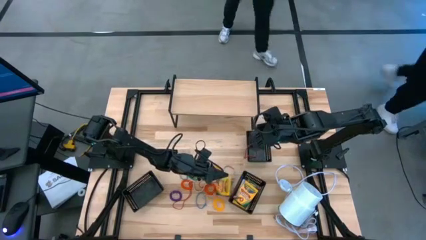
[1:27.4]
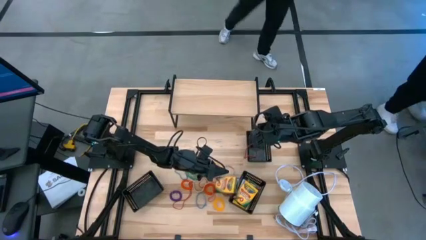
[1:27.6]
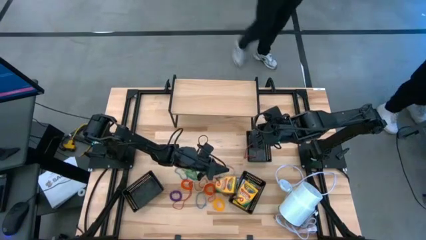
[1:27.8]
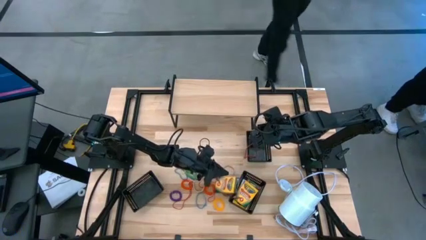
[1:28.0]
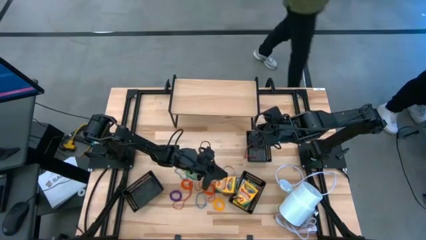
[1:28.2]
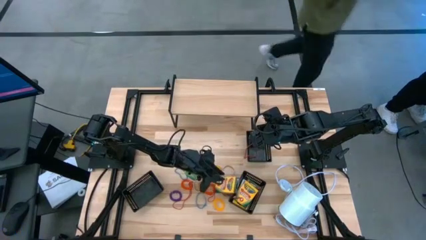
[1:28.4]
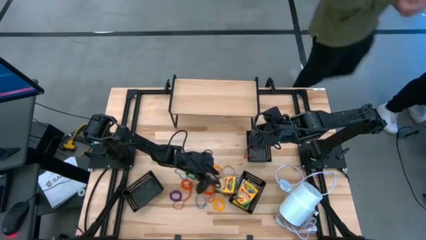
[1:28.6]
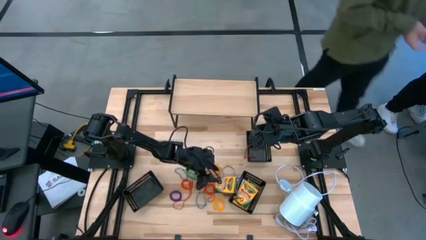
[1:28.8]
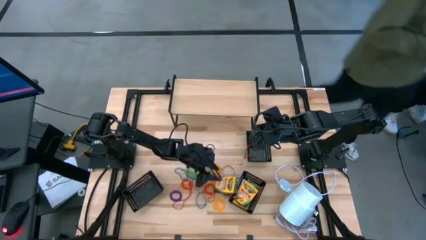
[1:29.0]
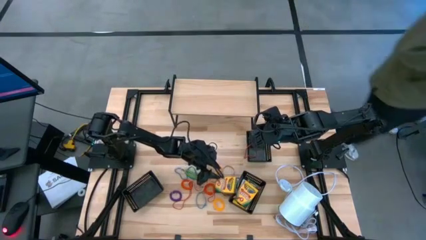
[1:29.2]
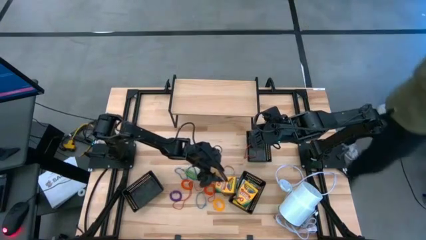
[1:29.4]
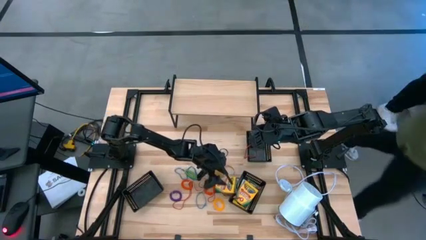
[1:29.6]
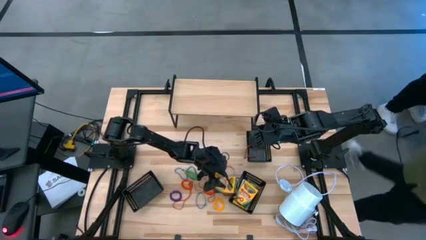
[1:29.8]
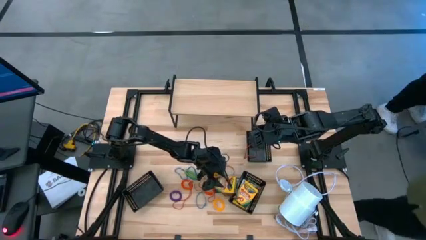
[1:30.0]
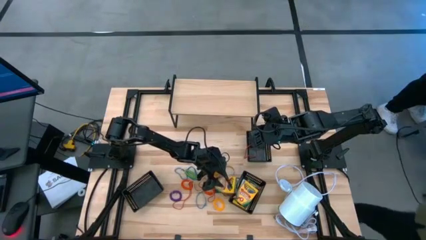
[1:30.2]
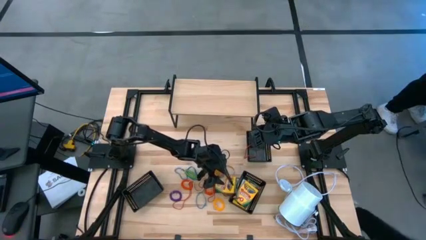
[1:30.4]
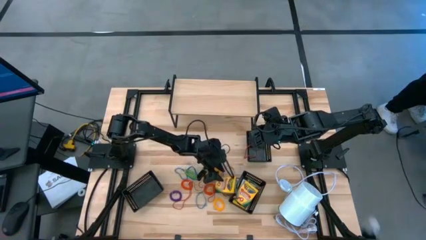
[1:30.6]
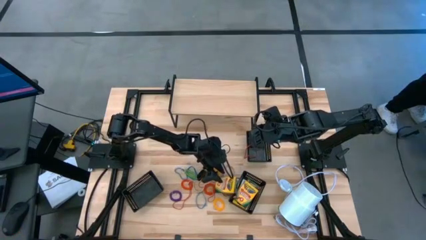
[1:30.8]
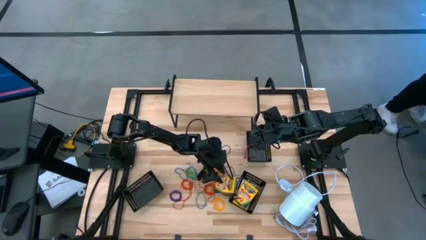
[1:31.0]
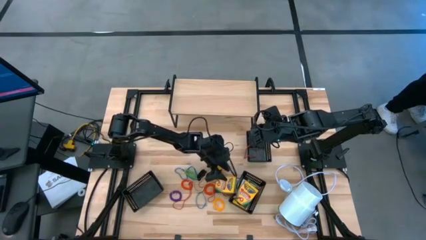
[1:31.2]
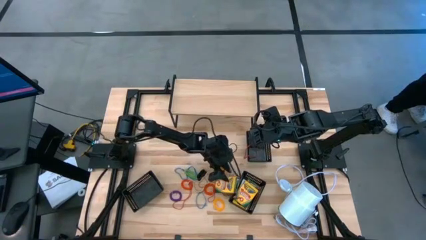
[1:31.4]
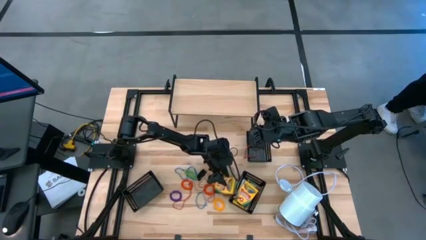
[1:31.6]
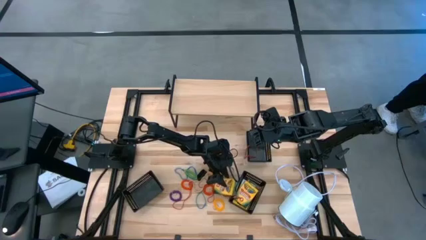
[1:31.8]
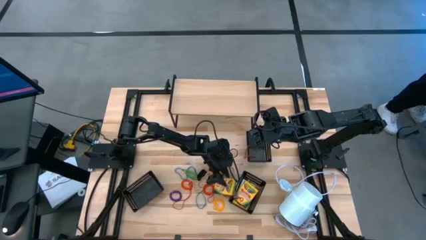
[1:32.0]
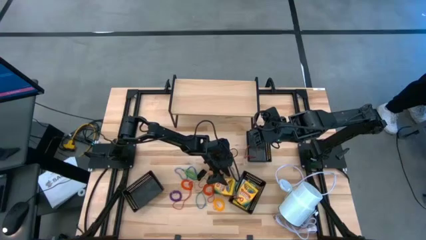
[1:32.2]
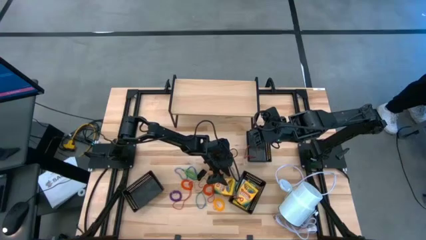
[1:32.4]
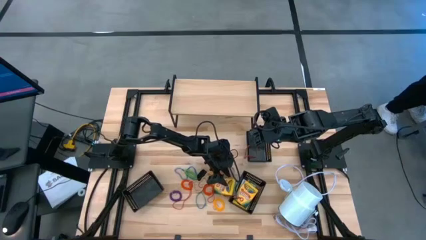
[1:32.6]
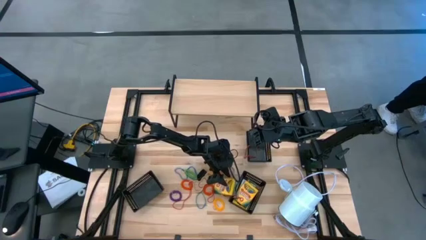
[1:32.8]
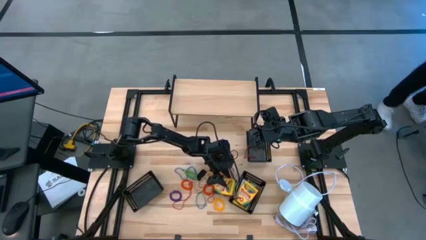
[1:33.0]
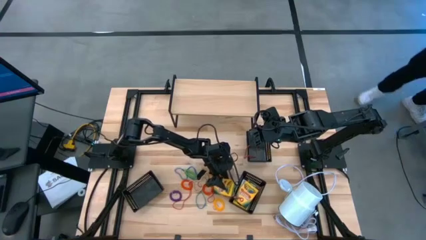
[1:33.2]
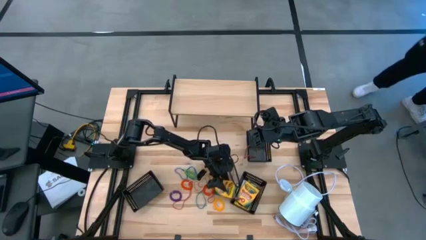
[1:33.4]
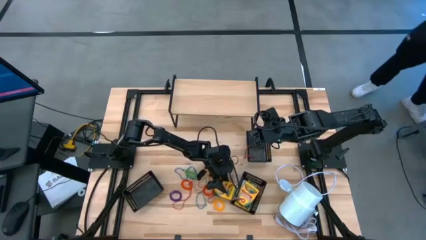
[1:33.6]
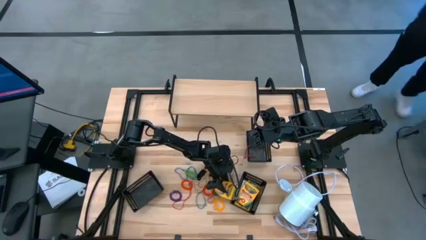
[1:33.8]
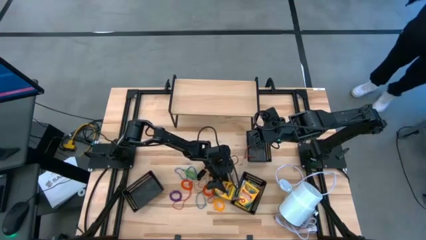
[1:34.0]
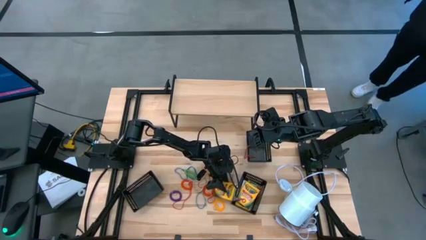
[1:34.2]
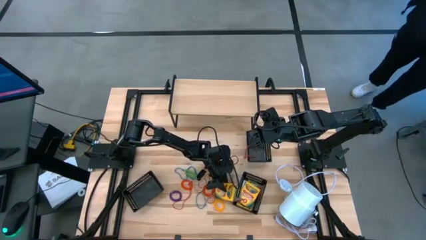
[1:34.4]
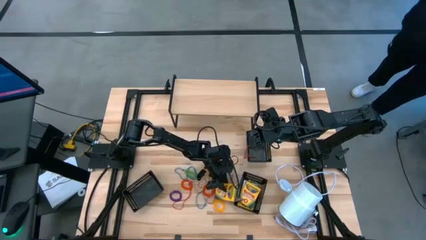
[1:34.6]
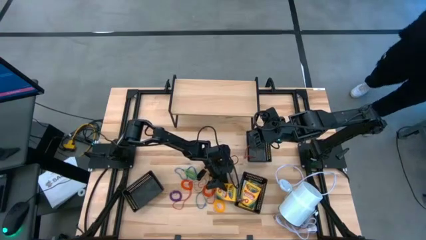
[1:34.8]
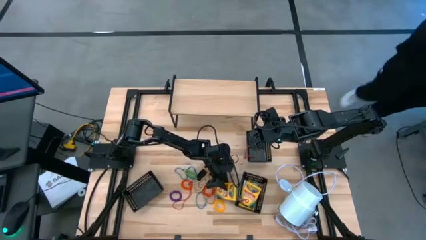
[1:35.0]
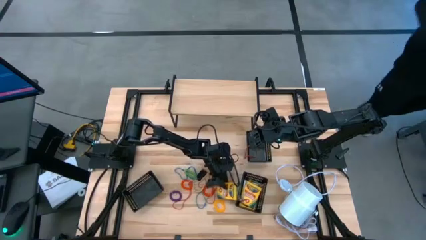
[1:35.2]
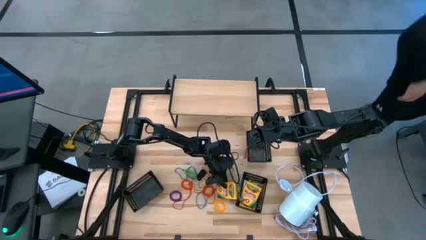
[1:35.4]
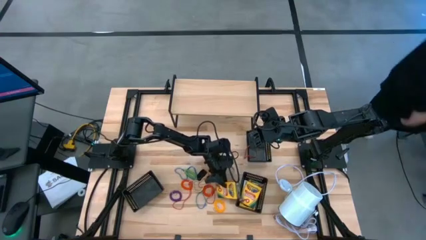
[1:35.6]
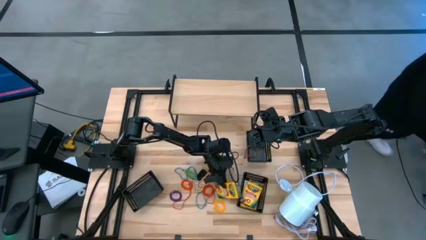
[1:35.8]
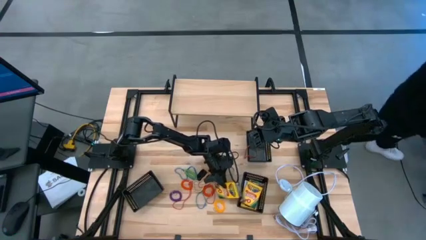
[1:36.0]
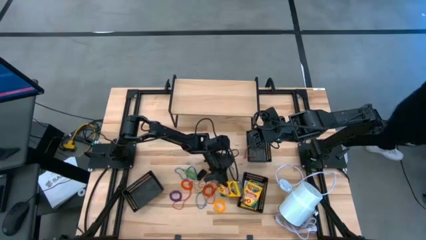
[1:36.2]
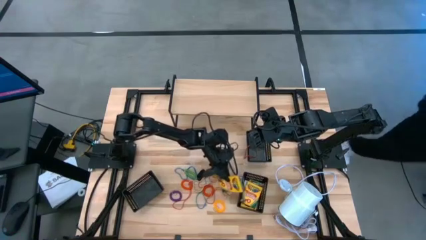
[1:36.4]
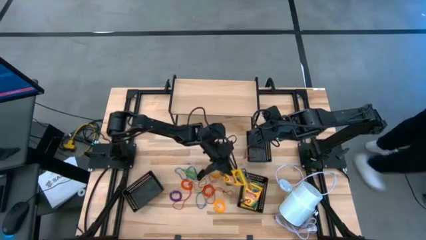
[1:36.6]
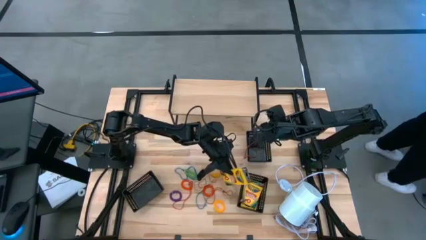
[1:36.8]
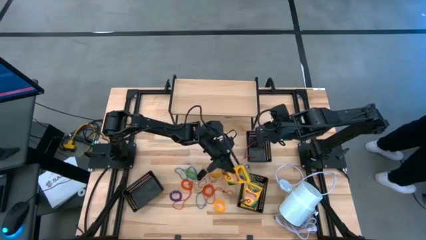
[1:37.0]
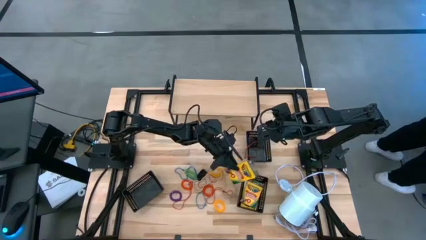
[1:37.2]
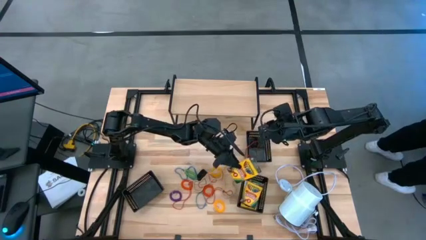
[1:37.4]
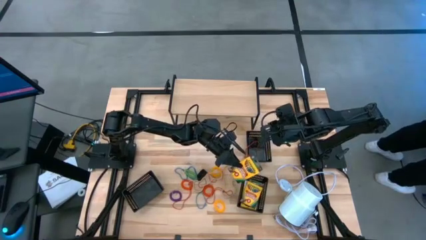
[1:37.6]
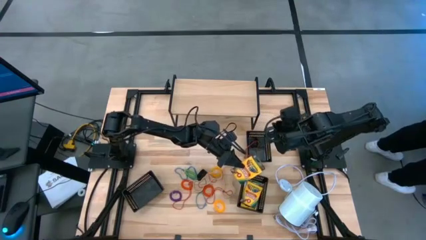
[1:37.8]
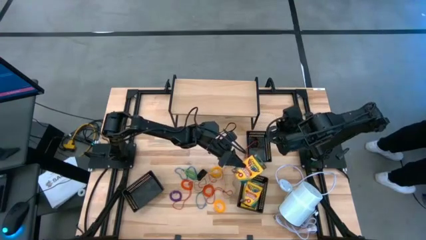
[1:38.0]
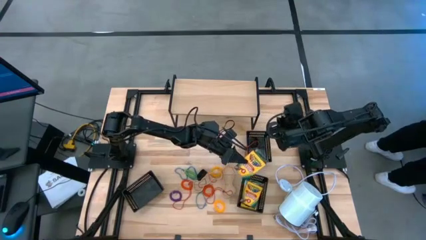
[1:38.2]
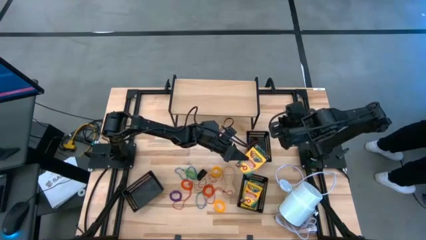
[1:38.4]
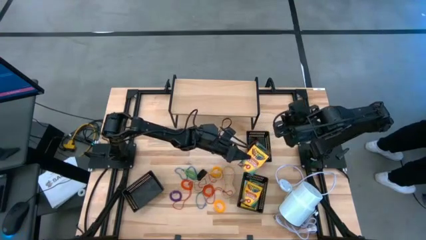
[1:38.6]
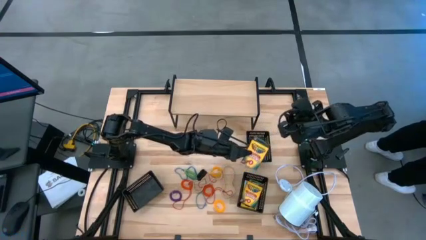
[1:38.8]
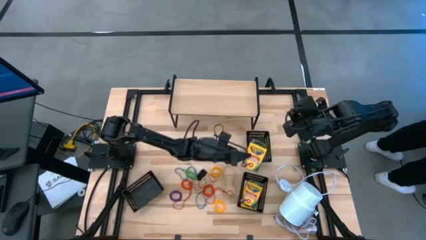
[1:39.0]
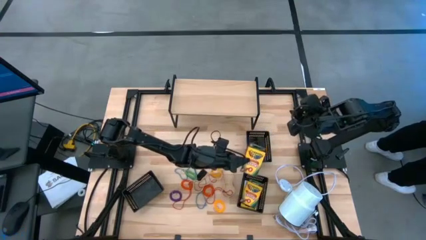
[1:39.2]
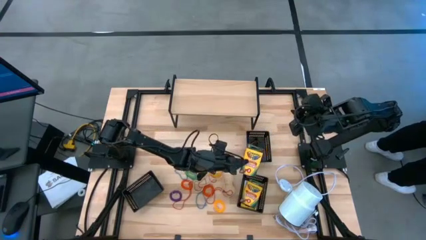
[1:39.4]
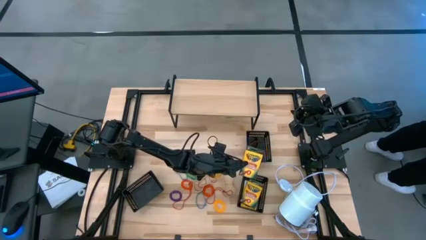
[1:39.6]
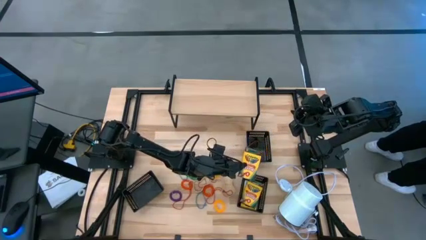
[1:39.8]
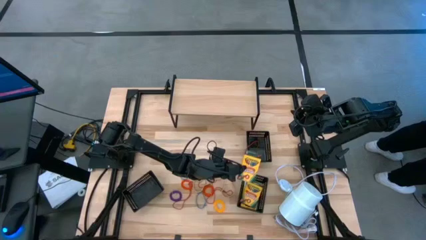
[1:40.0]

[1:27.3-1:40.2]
Task: Pick & Place Office Desk Supplies
Put the crayon box into the bottom right black bin

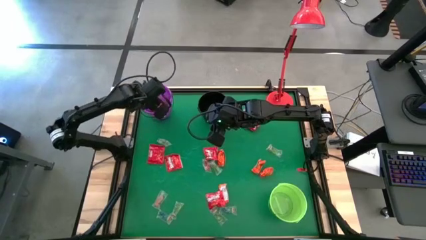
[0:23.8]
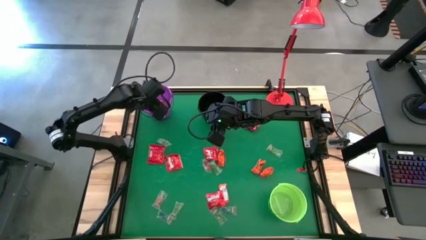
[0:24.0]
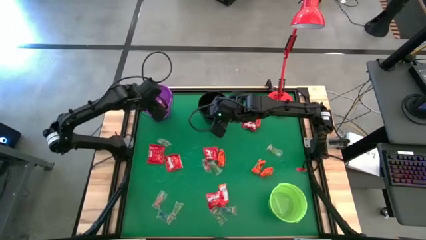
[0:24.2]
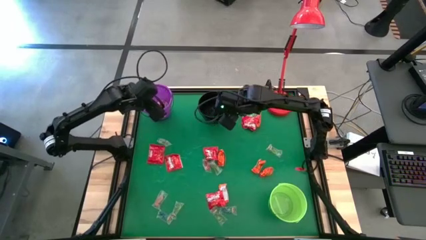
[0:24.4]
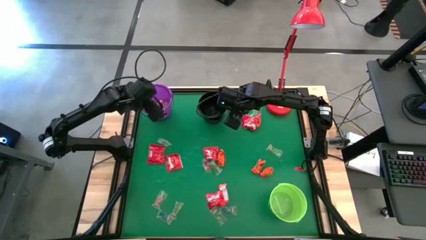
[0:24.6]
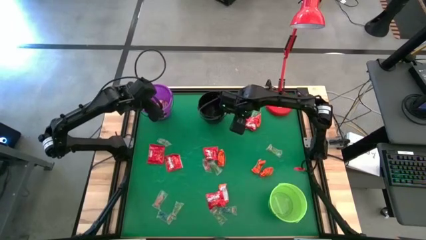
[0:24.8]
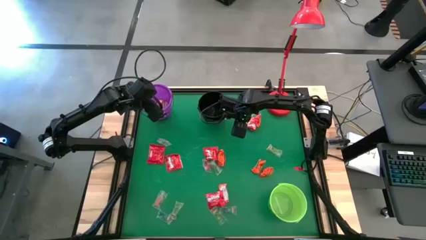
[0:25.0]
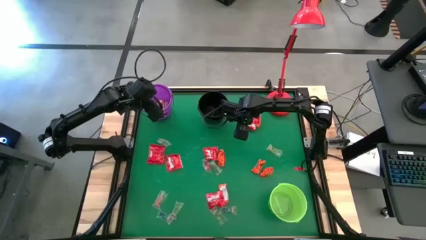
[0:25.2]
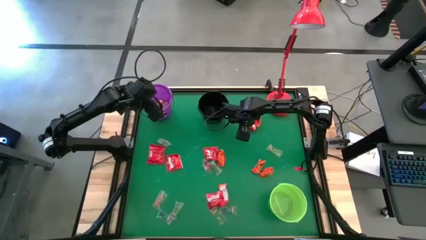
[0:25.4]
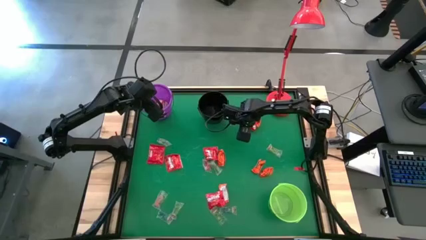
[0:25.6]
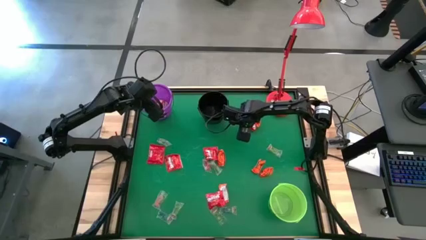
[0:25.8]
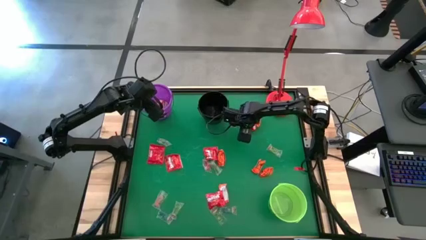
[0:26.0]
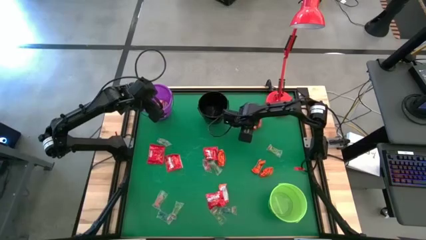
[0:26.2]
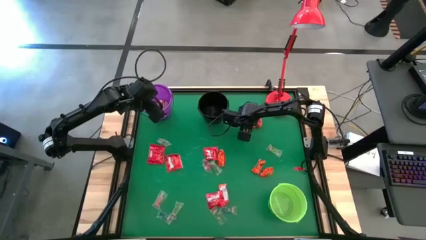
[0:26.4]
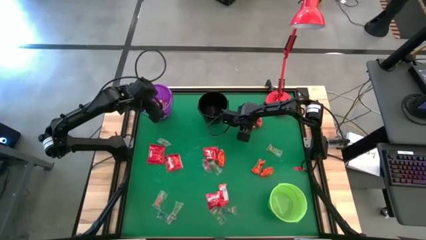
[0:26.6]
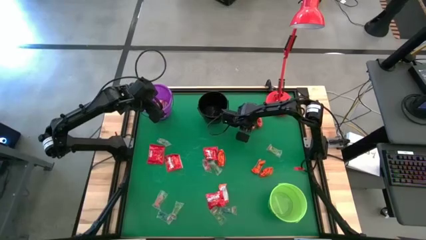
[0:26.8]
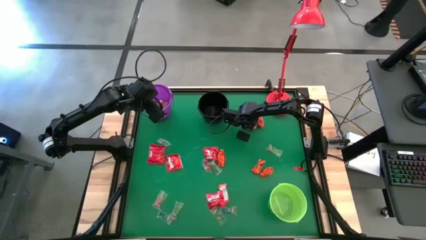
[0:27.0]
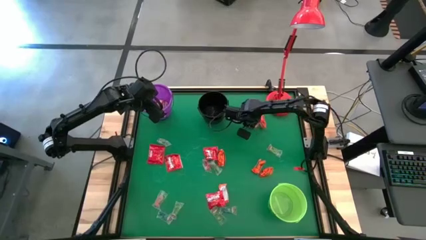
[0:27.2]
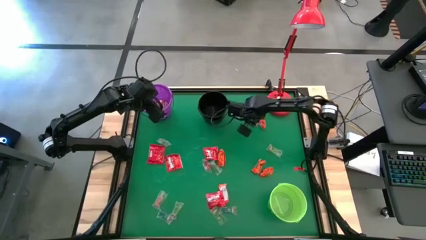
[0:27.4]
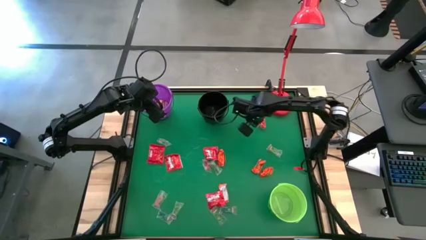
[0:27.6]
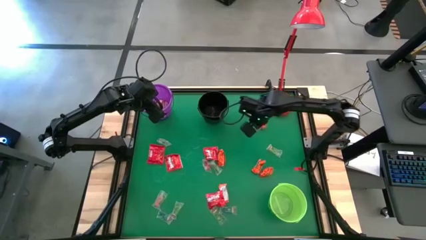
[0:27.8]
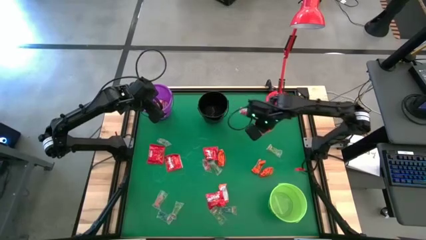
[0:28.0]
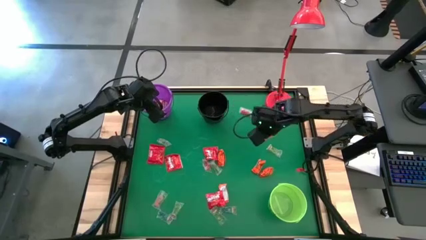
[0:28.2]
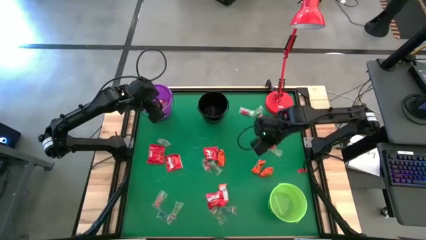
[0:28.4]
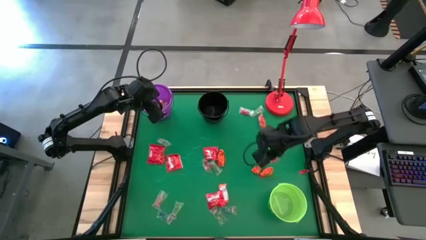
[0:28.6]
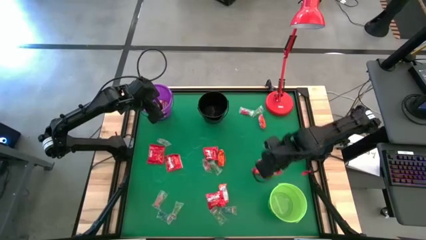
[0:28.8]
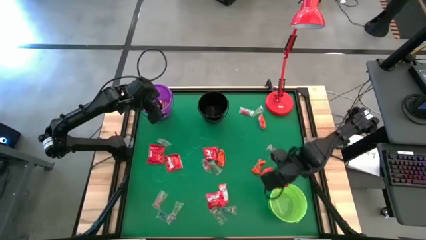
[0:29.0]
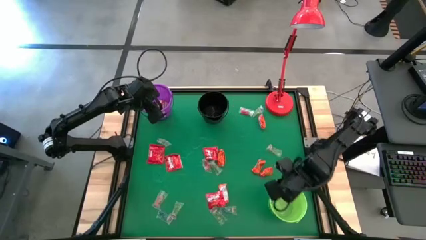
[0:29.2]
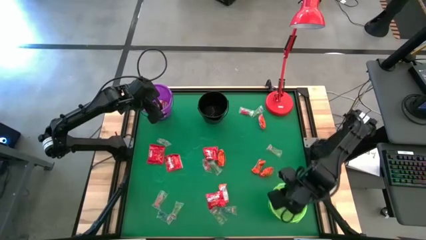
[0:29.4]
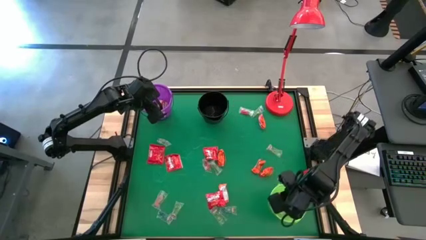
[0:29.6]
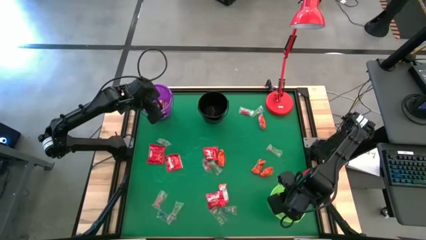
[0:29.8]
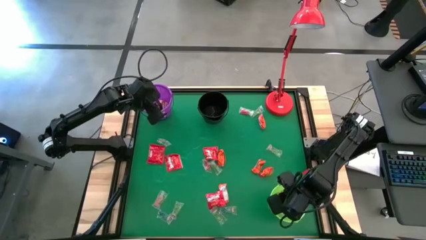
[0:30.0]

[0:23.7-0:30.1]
Task: Sort candy
Put the red candy into the green bucket
